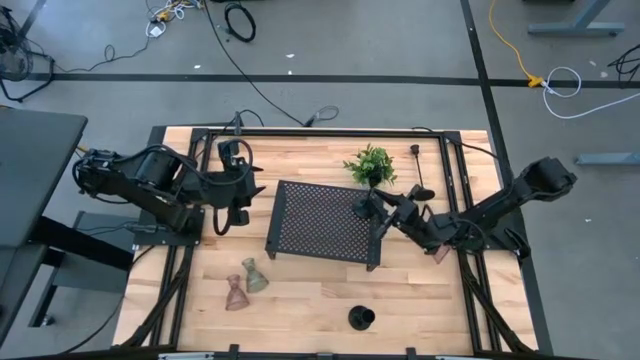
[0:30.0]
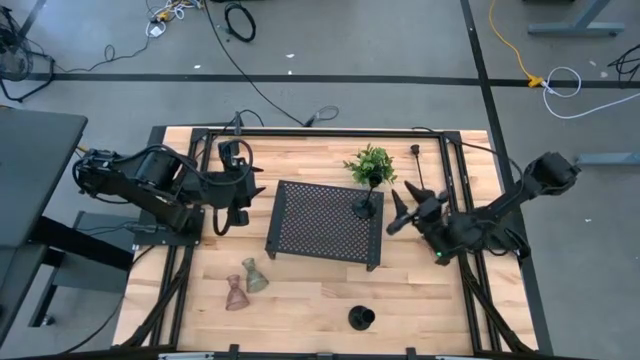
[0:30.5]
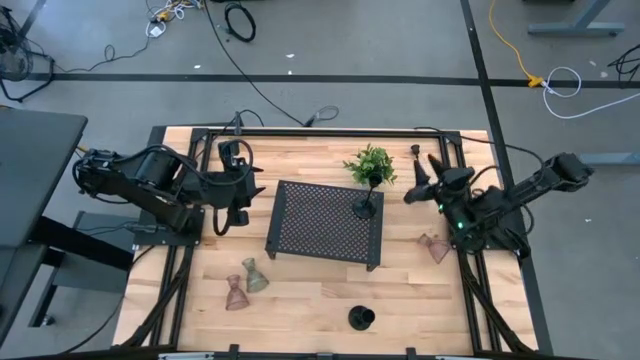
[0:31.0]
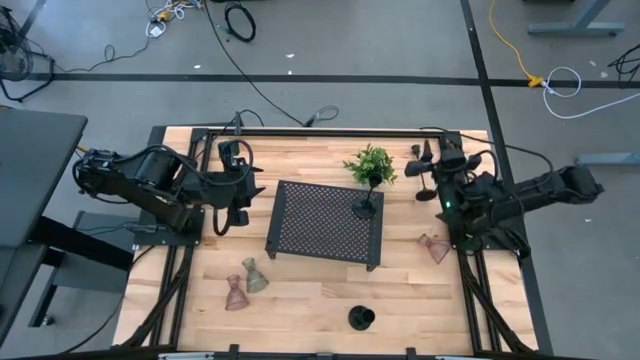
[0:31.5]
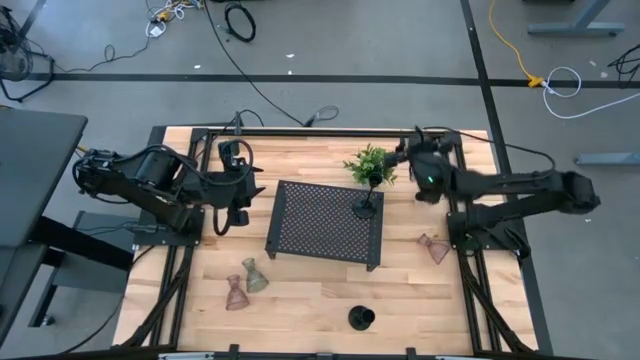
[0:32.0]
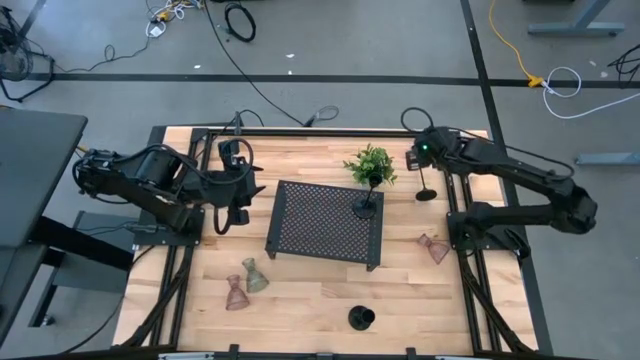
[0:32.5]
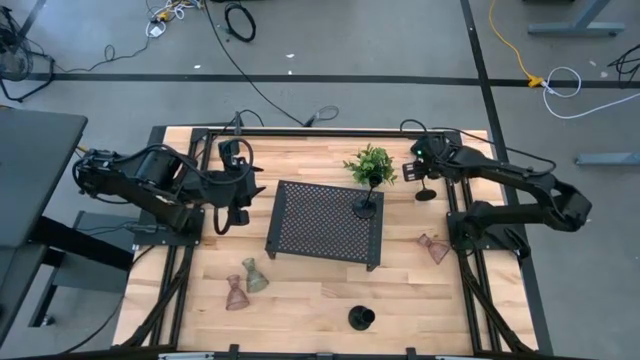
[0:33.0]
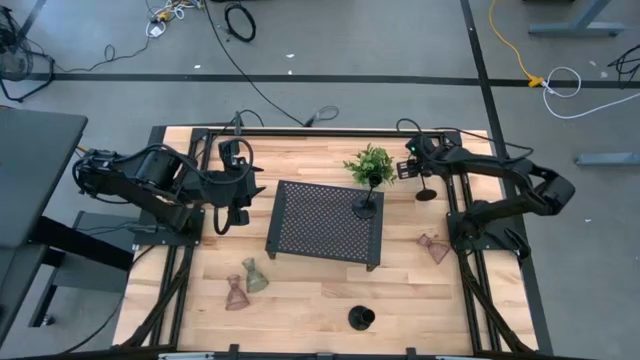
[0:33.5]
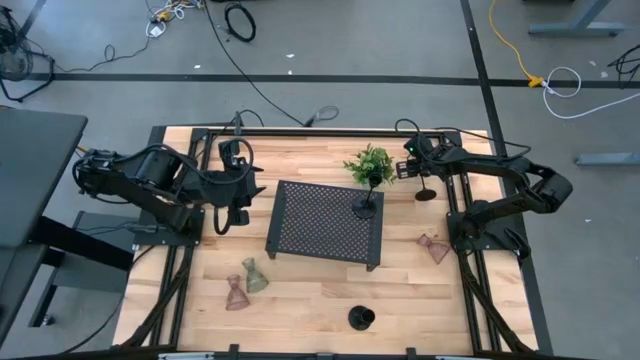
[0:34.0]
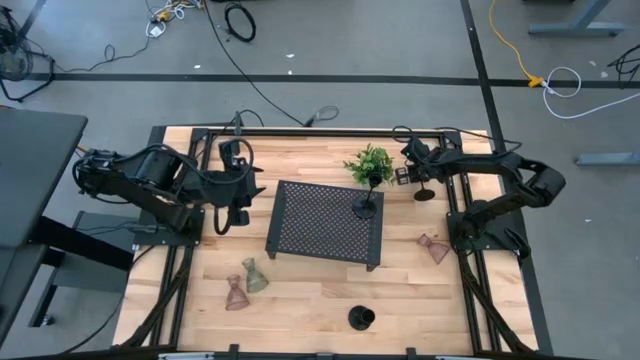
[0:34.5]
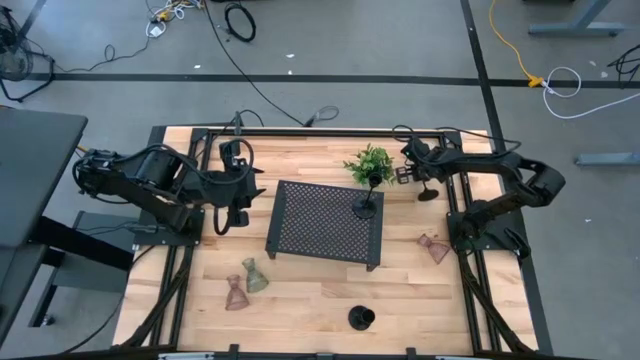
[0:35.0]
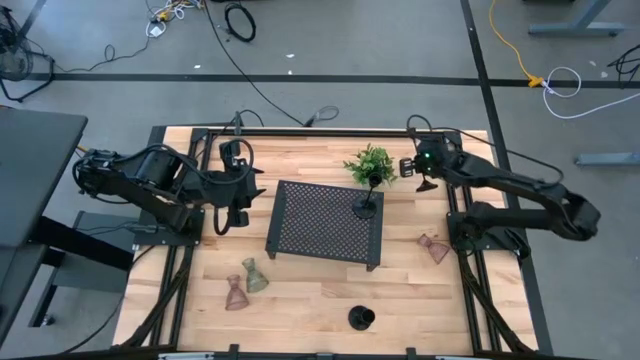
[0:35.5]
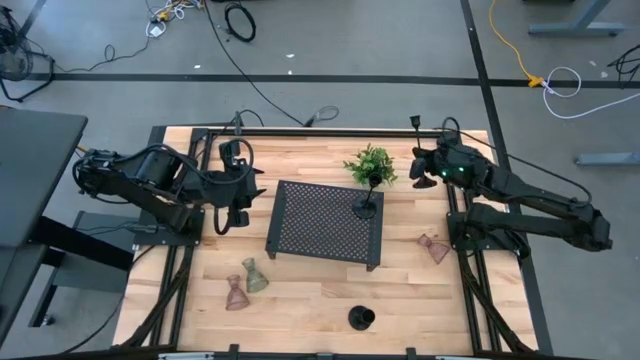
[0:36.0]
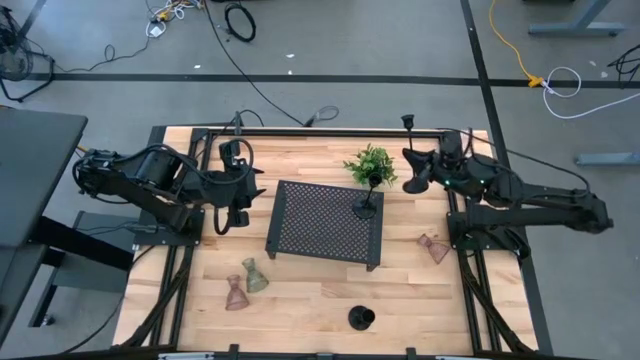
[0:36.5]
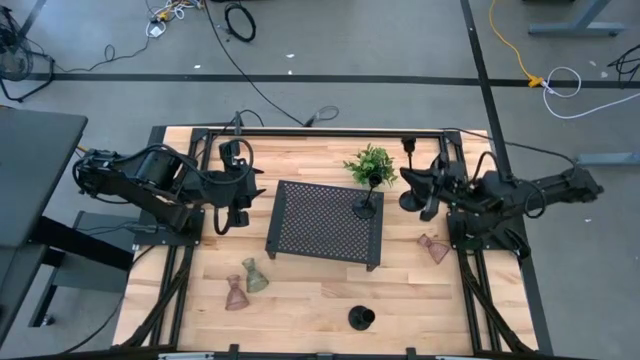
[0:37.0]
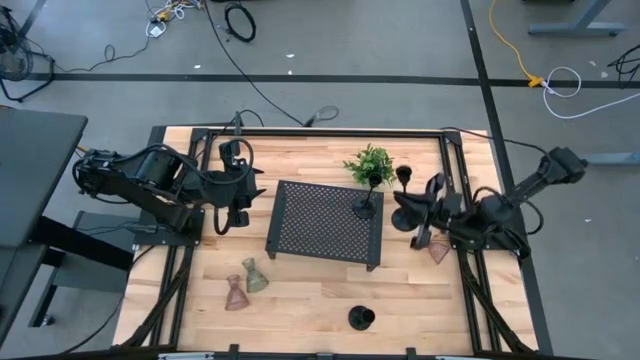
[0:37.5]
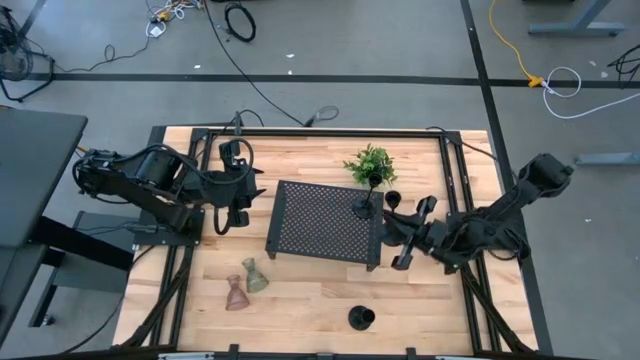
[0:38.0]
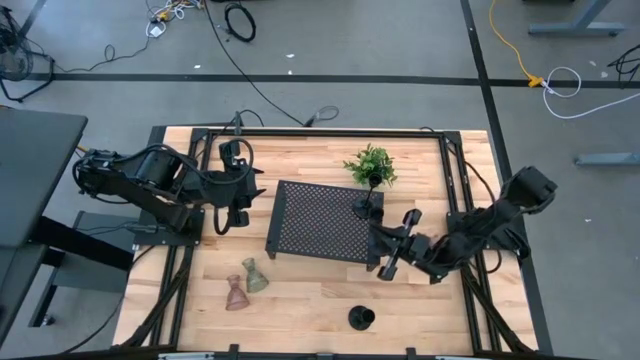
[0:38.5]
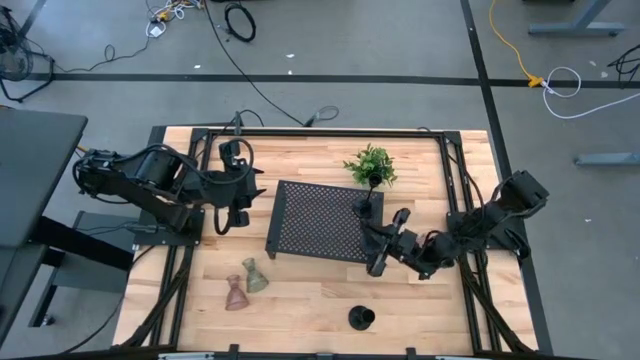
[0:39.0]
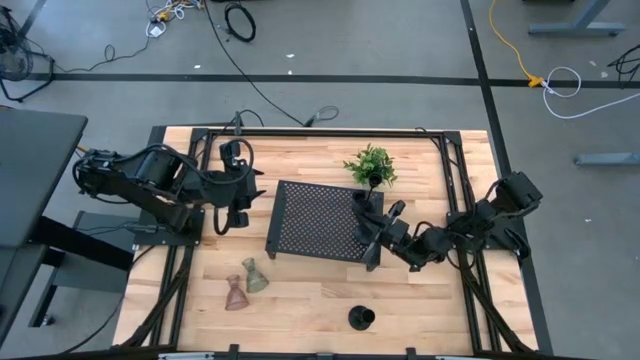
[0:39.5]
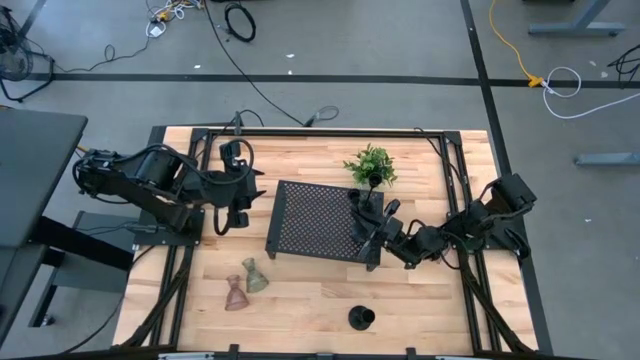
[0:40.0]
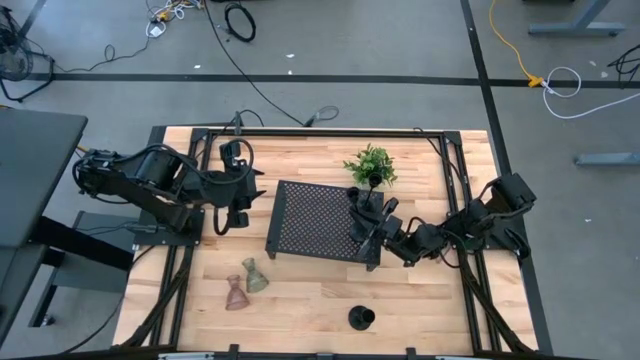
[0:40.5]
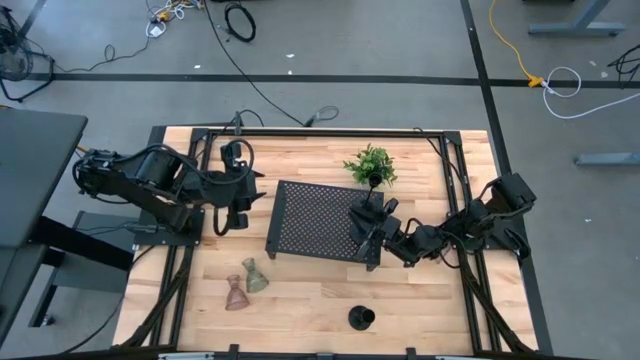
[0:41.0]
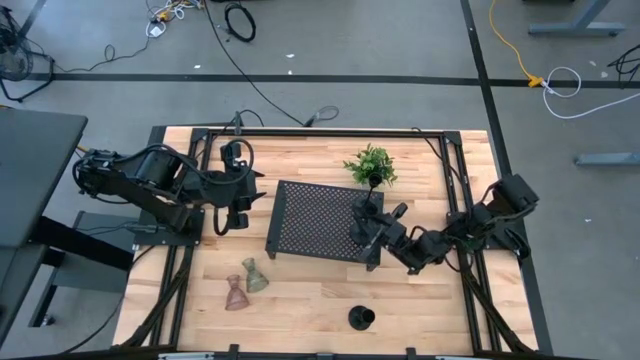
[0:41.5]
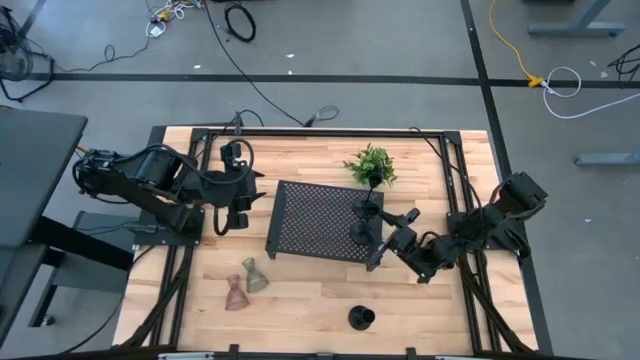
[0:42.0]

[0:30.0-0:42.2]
Task: Pick & Place candle stick holders
Put the top black metal candle holder on the shelf

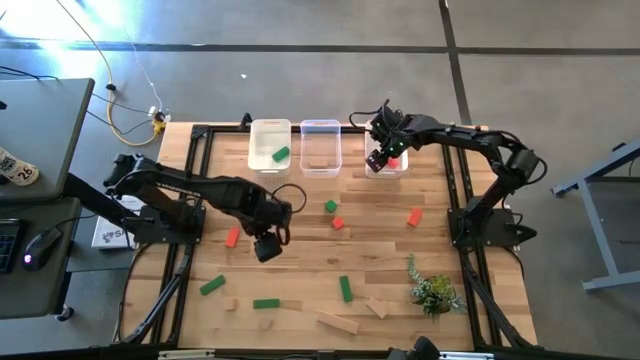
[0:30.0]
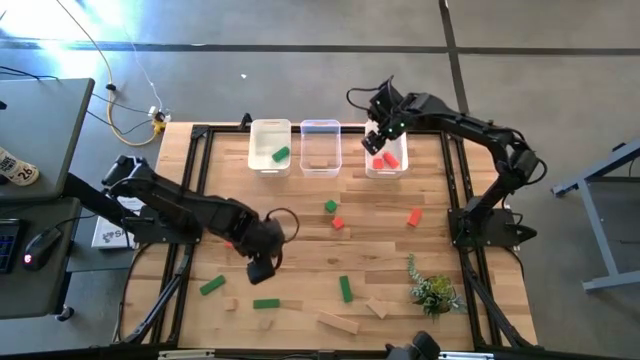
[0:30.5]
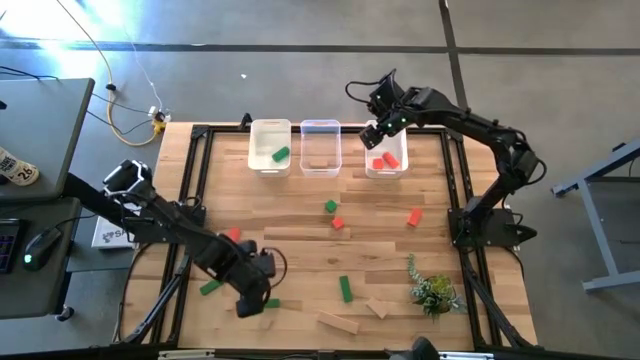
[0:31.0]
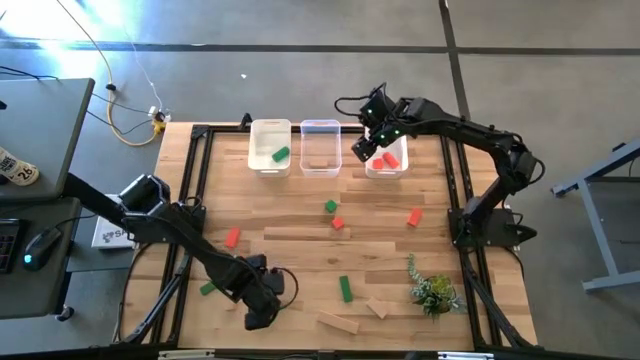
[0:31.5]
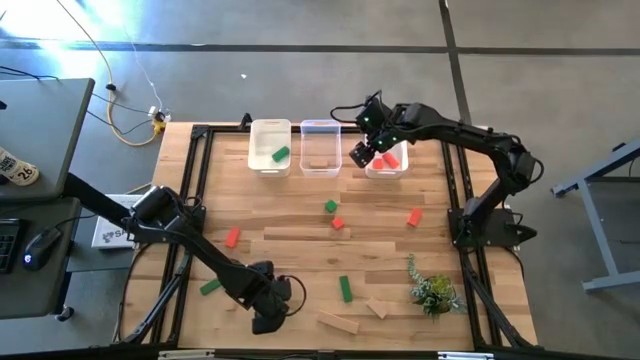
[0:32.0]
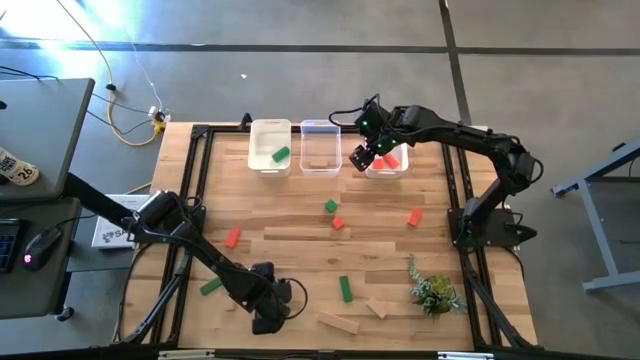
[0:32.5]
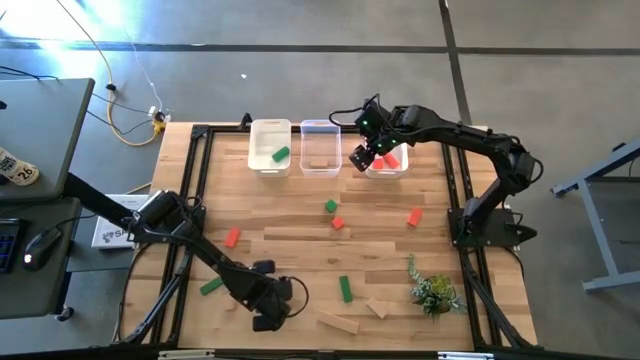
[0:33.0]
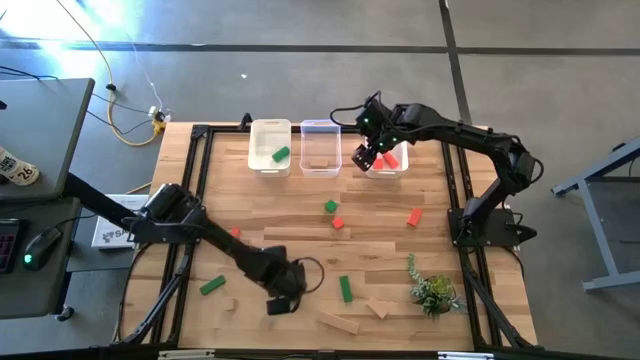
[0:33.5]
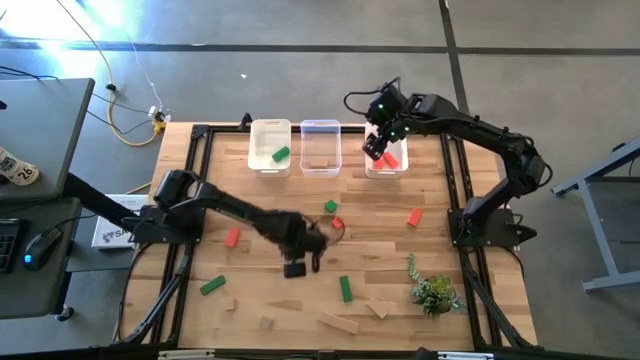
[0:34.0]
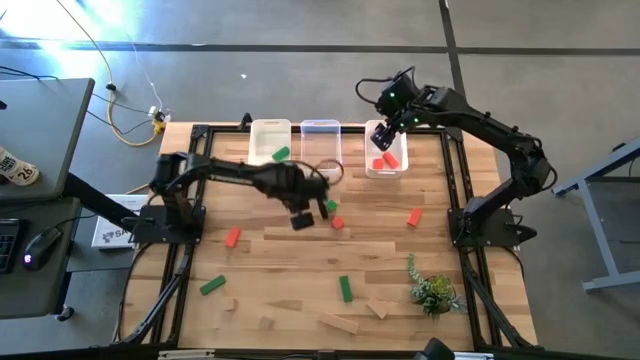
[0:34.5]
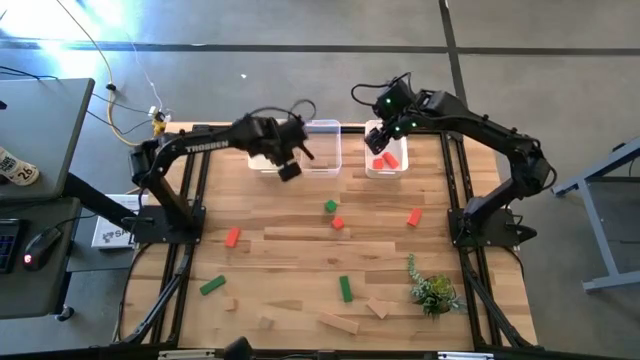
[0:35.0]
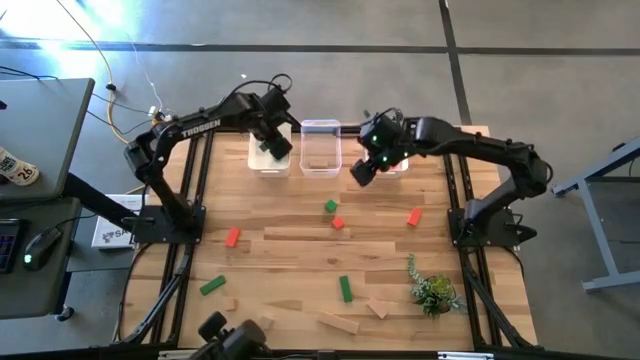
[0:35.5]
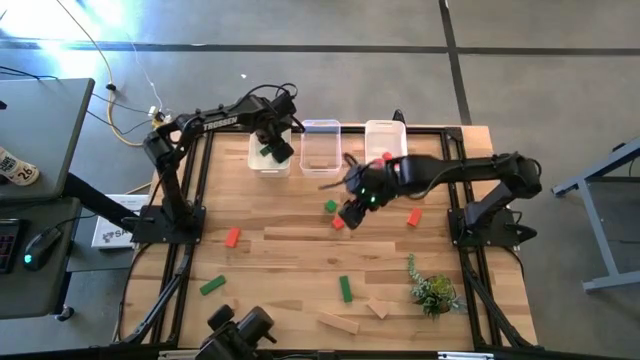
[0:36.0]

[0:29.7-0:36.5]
Task: Sort & place blocks by color
Put the green block into the left white bin

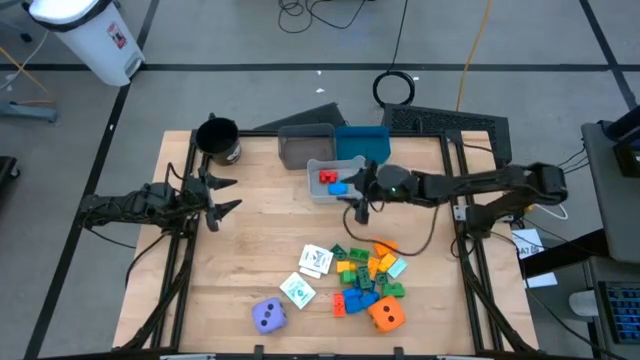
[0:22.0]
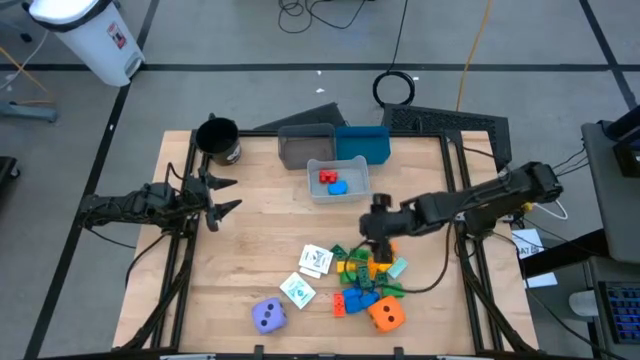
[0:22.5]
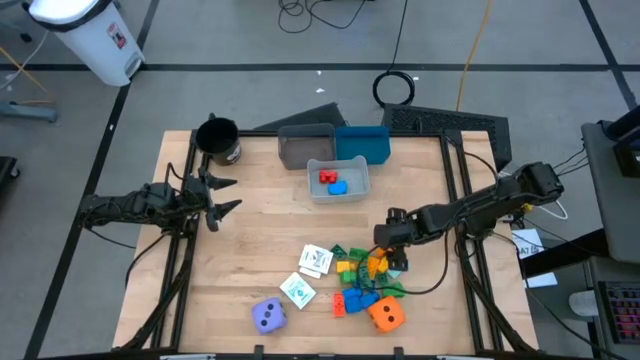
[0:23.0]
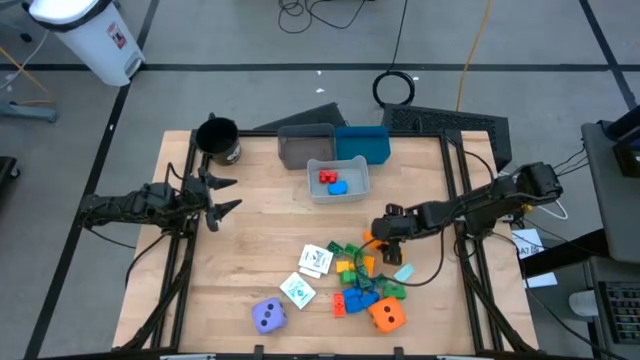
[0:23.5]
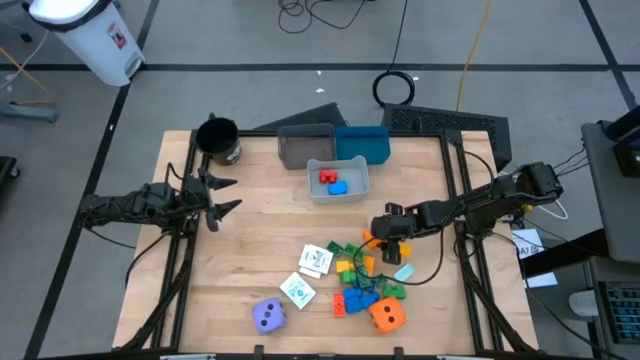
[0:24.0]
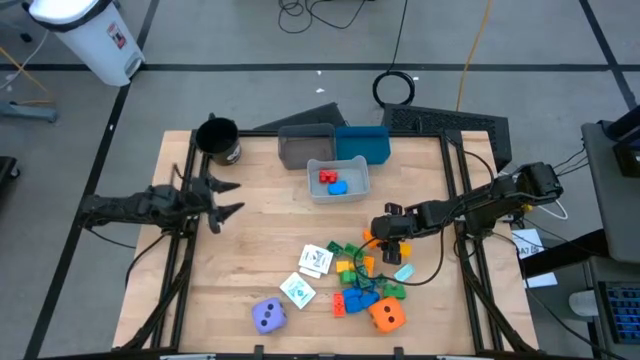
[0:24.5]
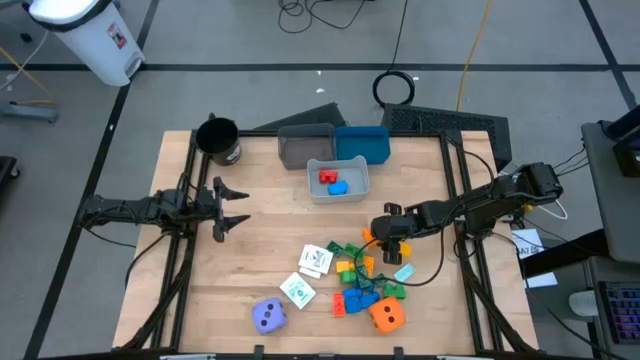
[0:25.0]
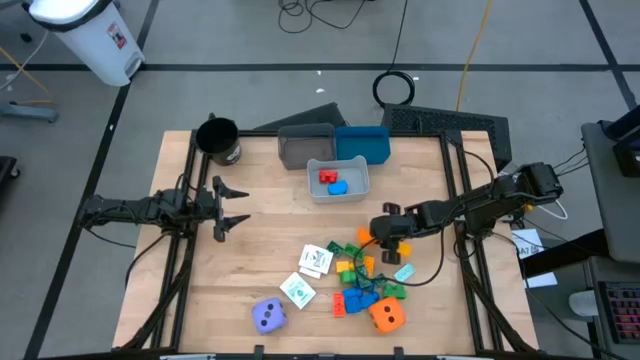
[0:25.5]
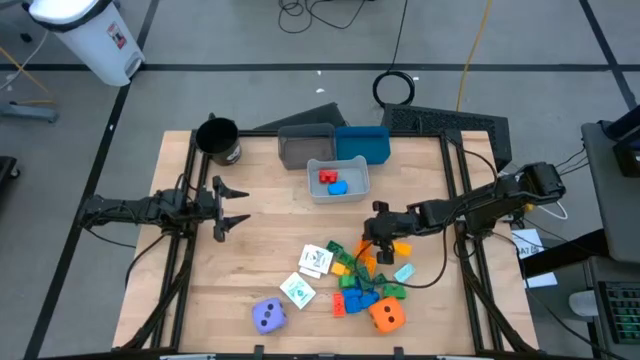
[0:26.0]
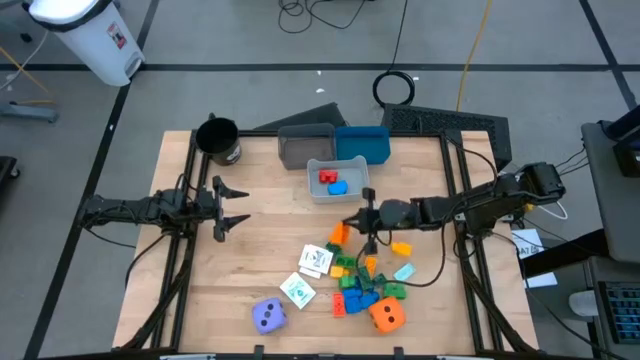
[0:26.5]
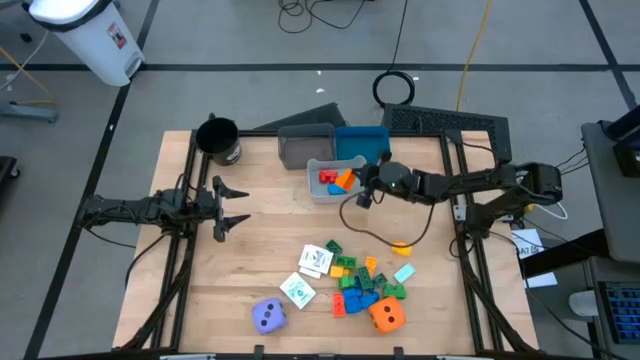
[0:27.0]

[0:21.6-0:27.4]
Task: Pick & Place Toys
Put the orange game piece into the gray bin
